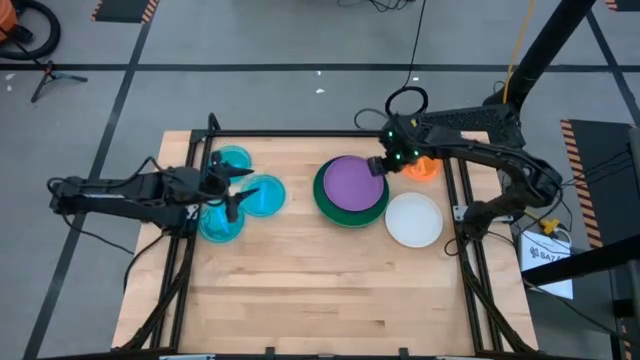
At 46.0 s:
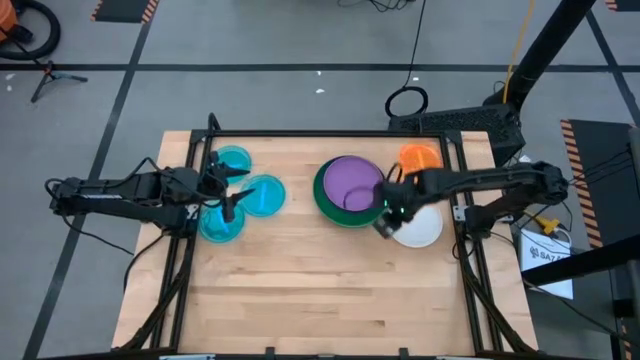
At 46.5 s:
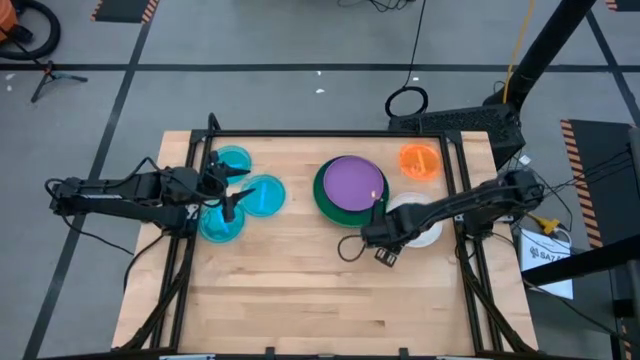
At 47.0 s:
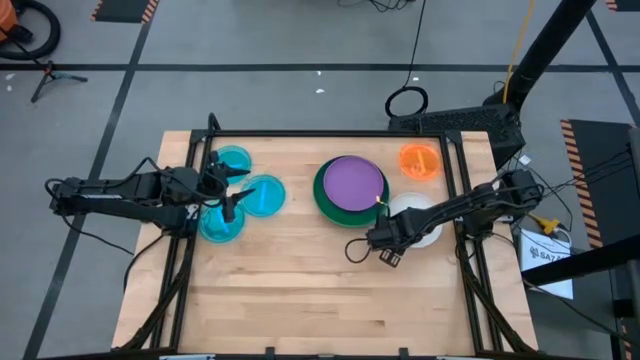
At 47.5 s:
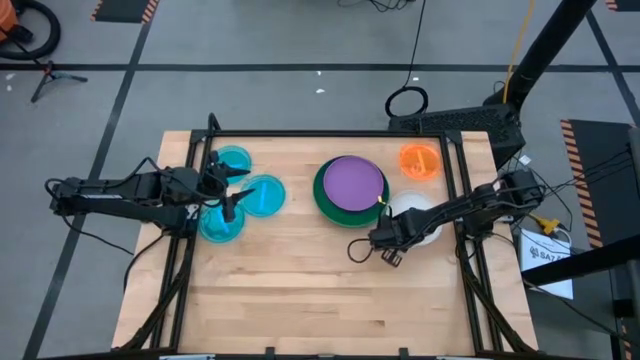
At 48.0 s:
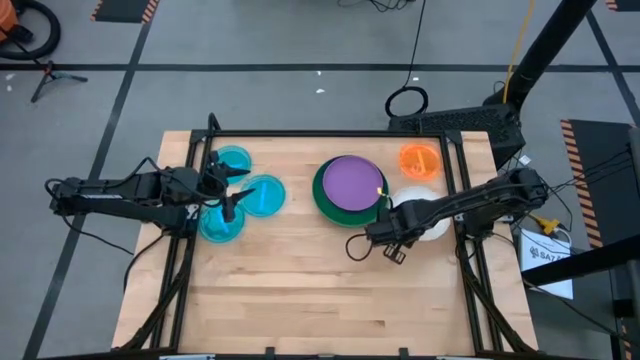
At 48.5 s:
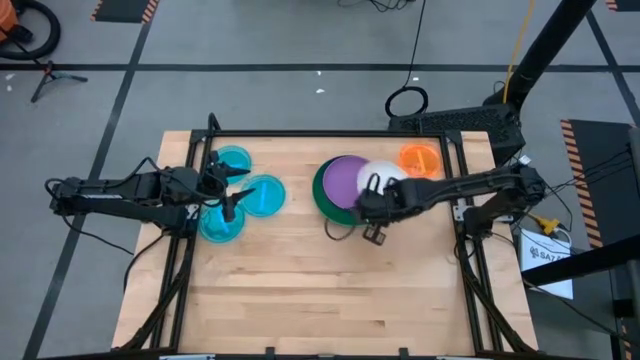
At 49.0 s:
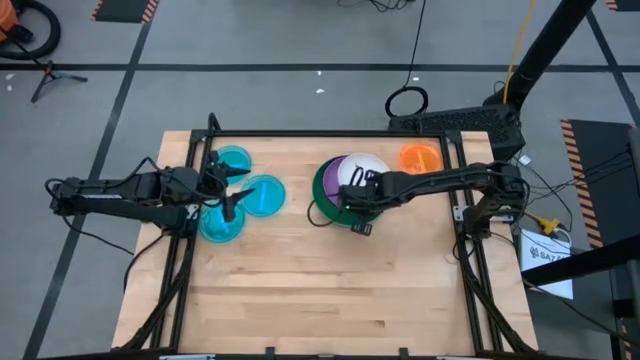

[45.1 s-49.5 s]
Task: Stack plastic plates
Stack the white plate on the purple plate

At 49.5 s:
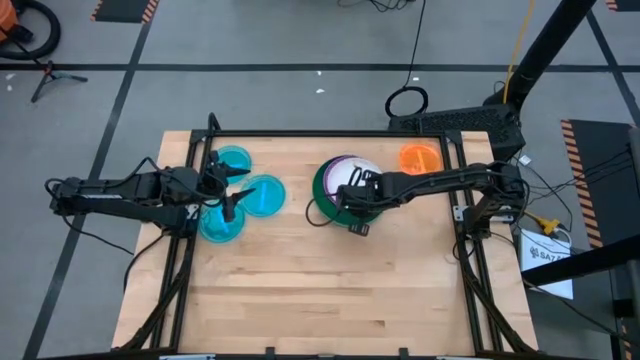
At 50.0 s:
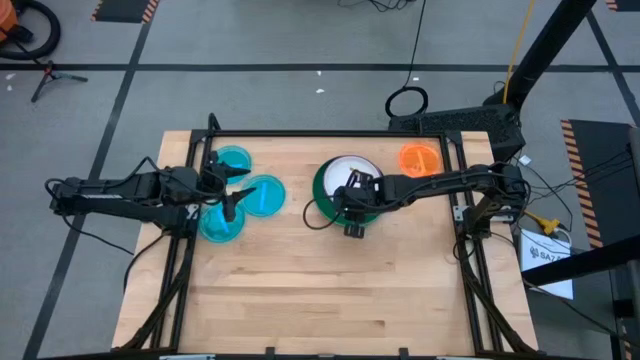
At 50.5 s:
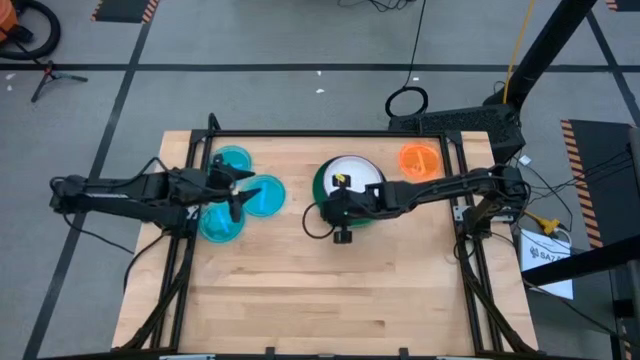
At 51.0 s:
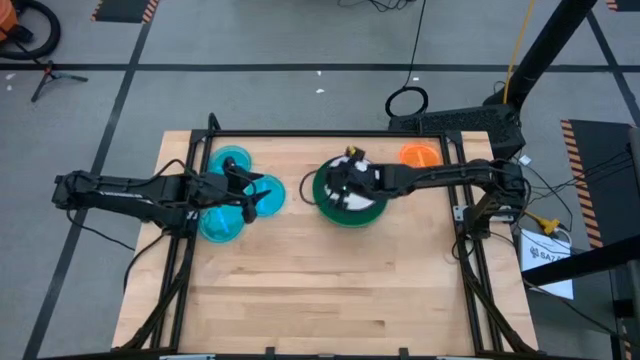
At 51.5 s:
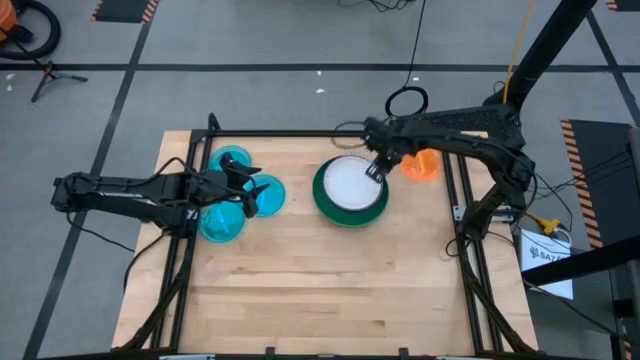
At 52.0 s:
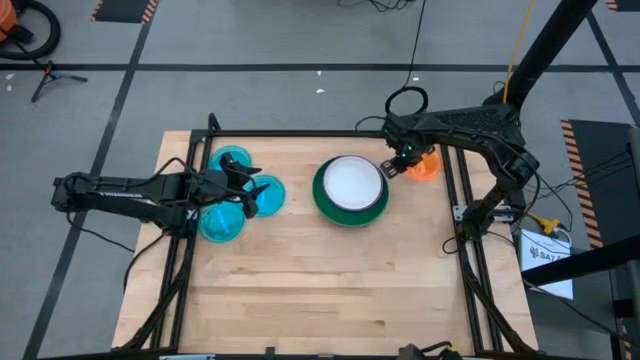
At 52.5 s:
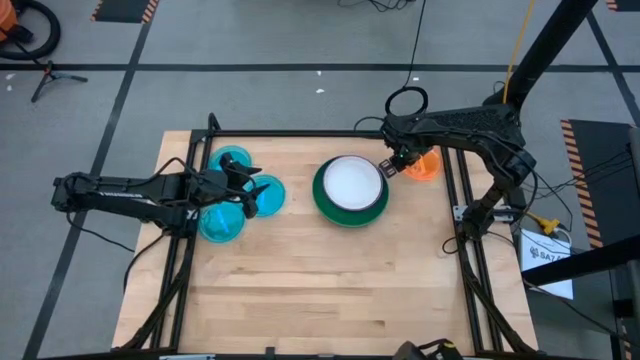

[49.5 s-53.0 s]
Stack the orange plate on the white plate

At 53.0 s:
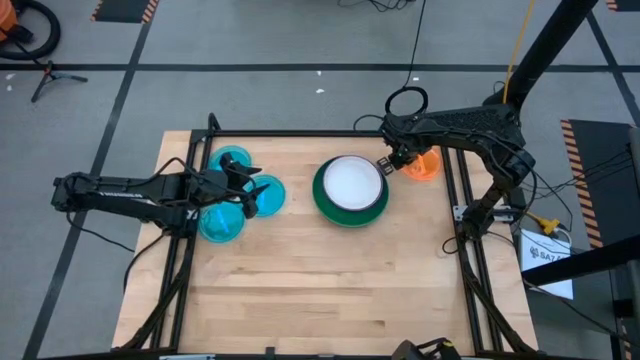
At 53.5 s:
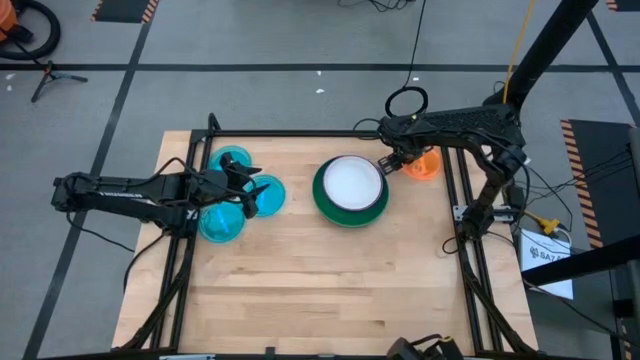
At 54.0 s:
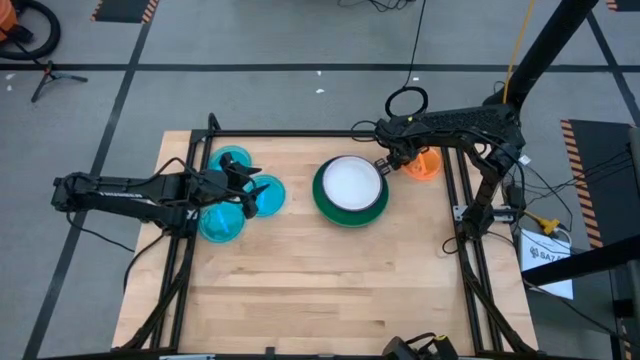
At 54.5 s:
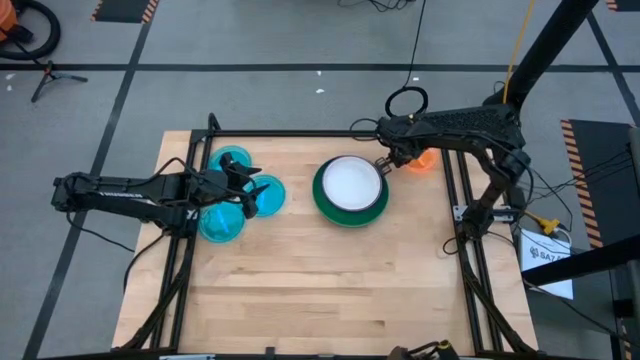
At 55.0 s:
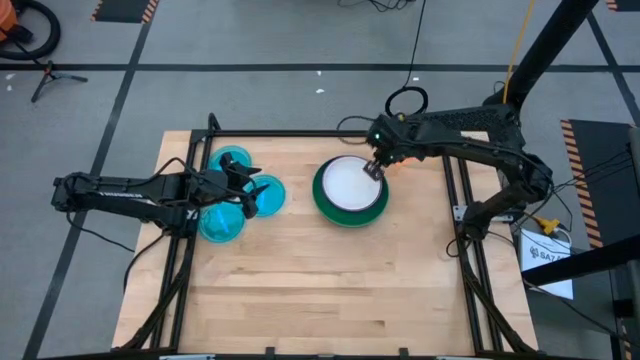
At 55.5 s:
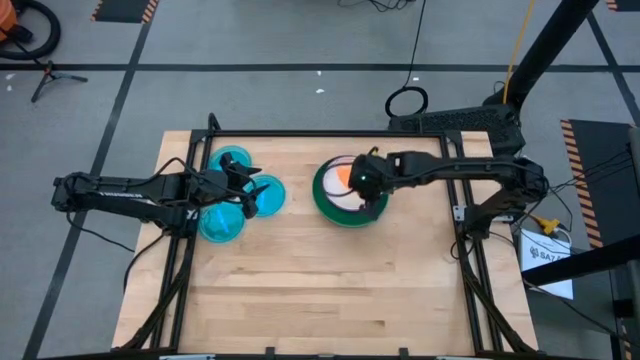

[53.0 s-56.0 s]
Stack the orange plate on the white plate

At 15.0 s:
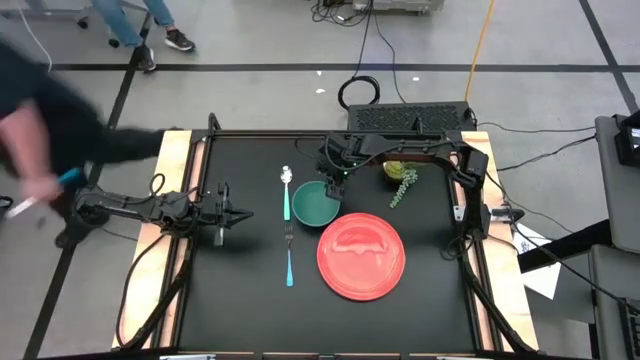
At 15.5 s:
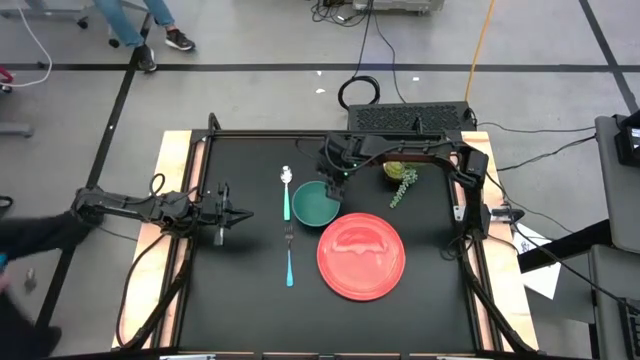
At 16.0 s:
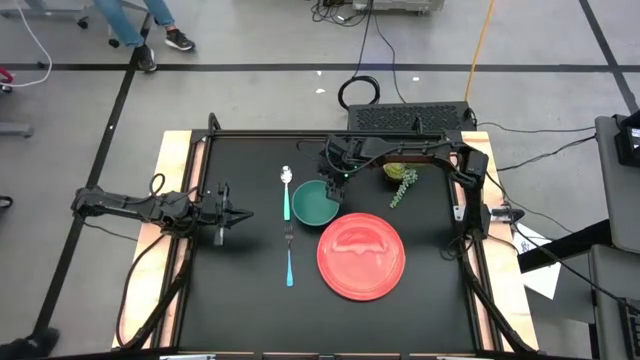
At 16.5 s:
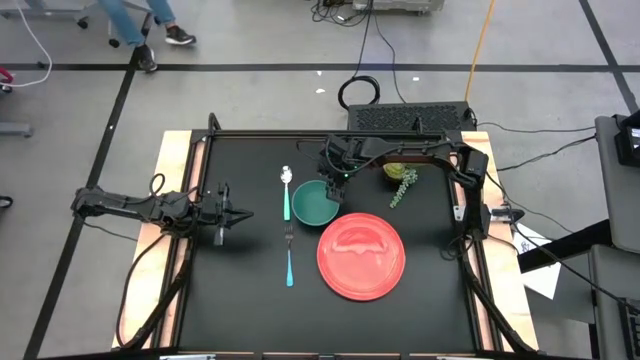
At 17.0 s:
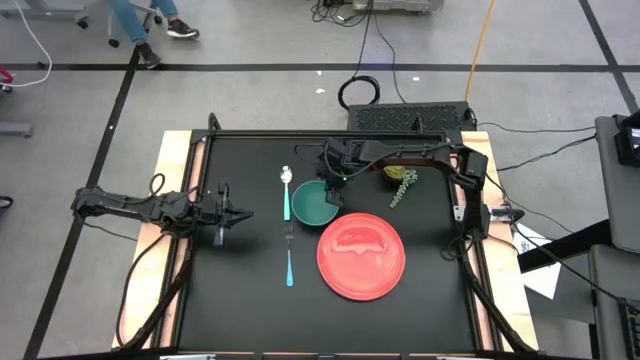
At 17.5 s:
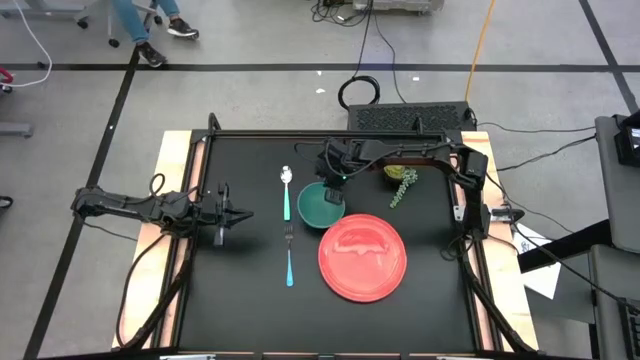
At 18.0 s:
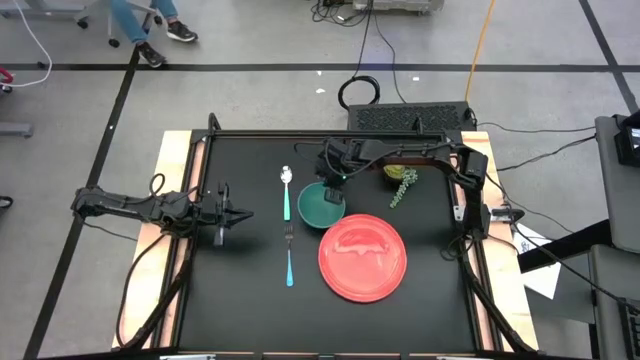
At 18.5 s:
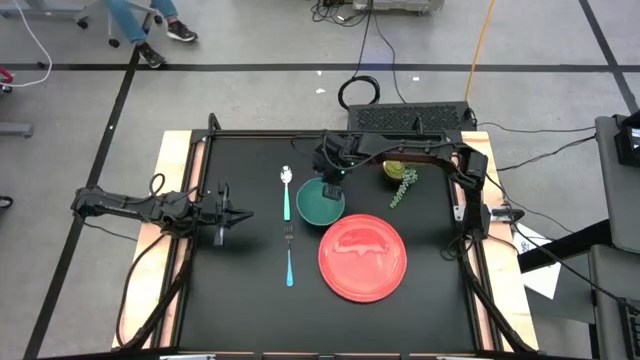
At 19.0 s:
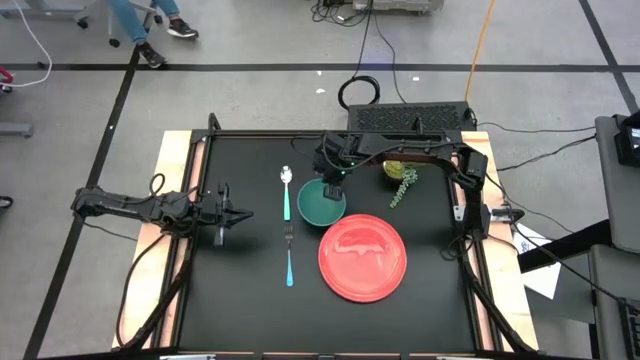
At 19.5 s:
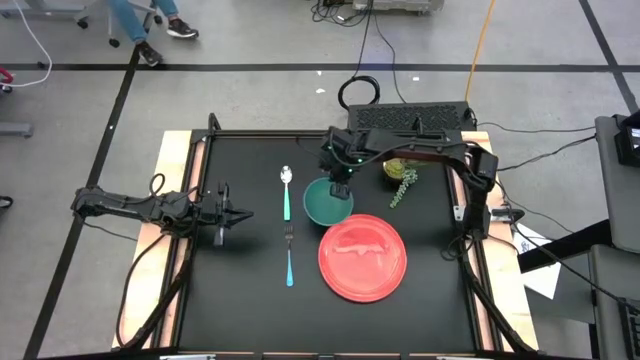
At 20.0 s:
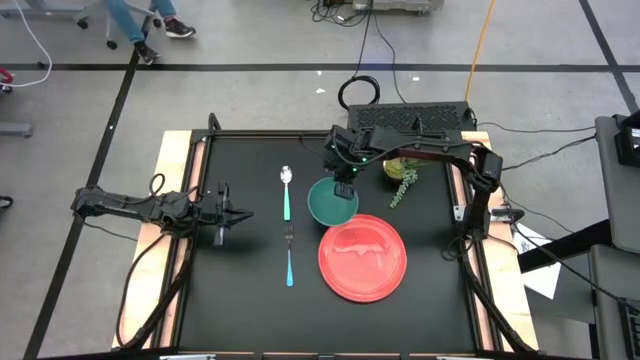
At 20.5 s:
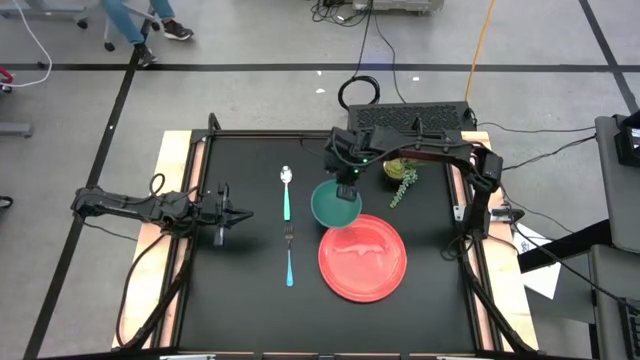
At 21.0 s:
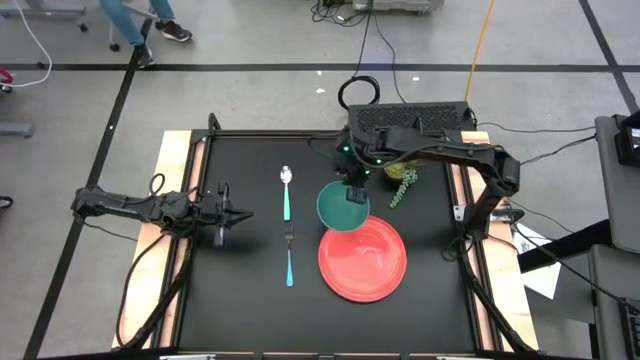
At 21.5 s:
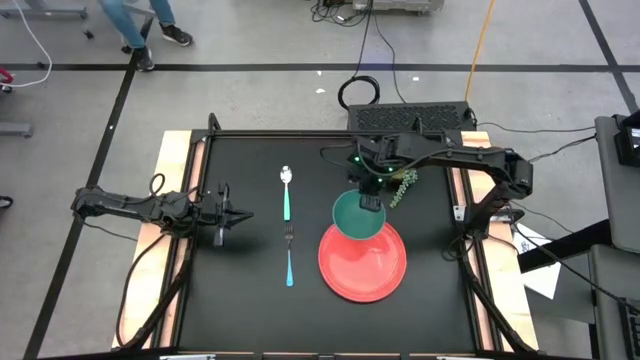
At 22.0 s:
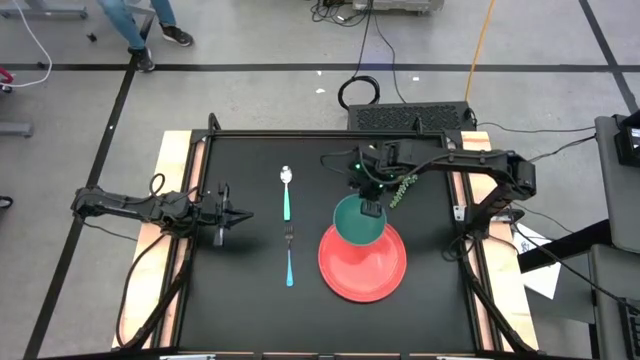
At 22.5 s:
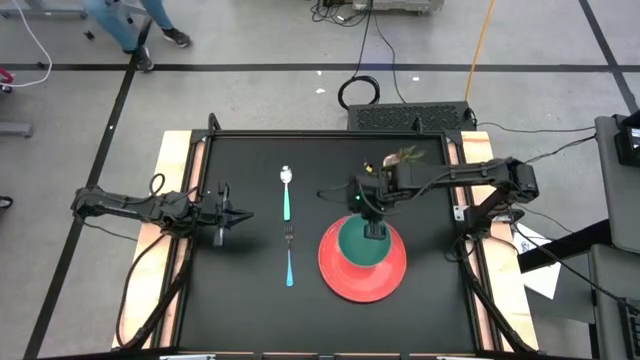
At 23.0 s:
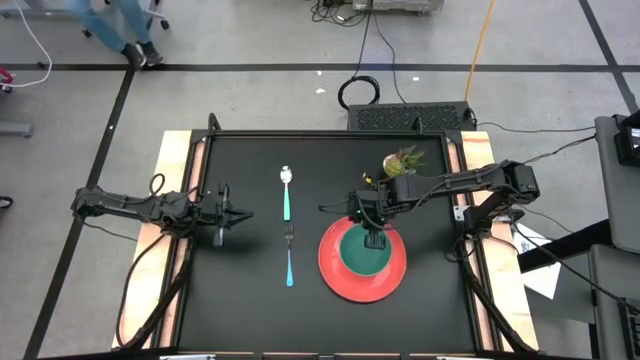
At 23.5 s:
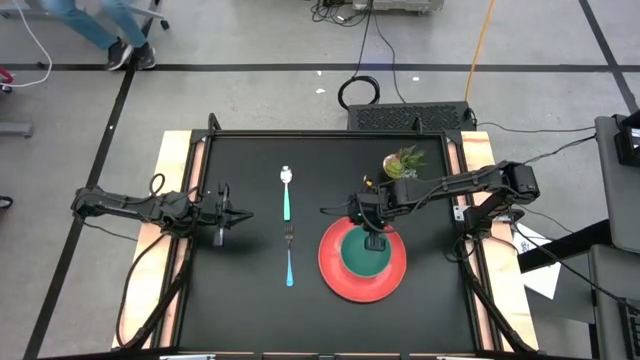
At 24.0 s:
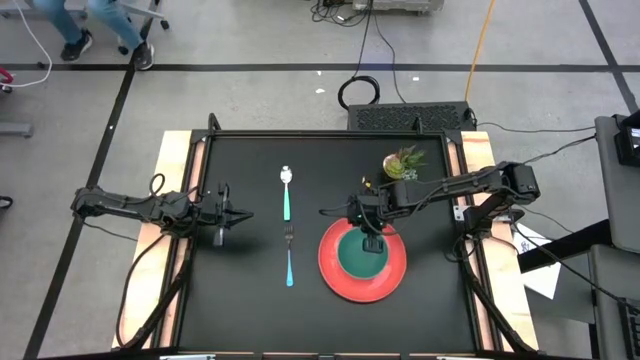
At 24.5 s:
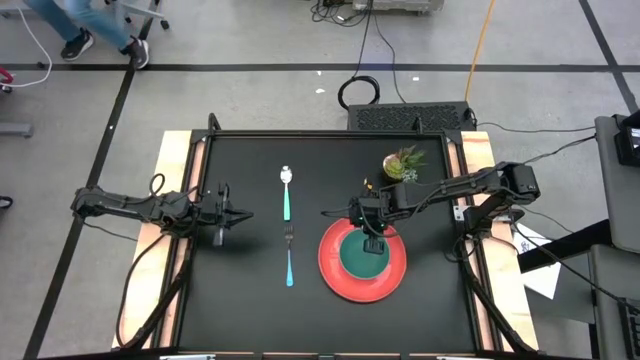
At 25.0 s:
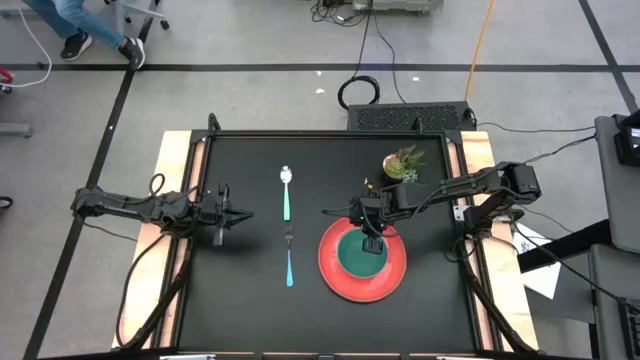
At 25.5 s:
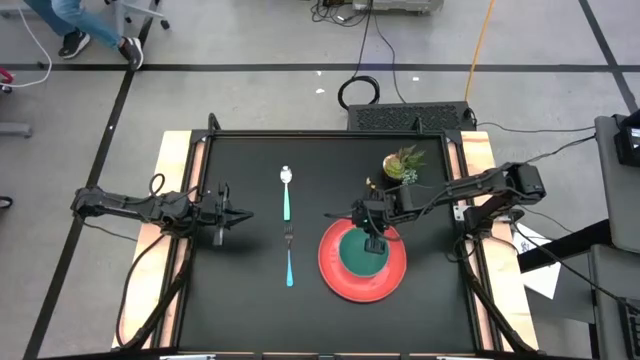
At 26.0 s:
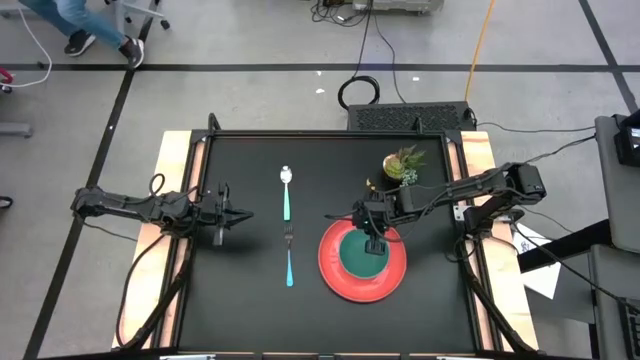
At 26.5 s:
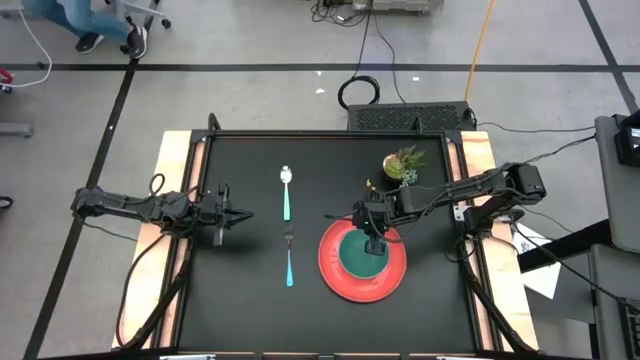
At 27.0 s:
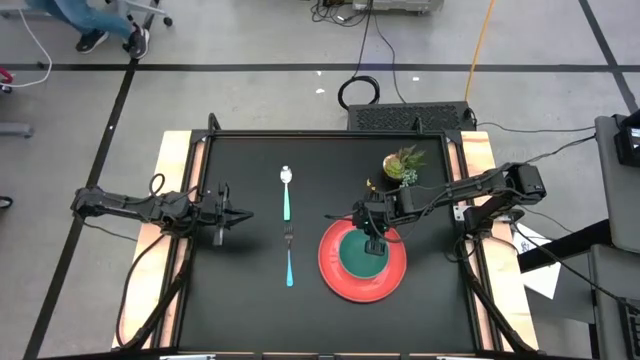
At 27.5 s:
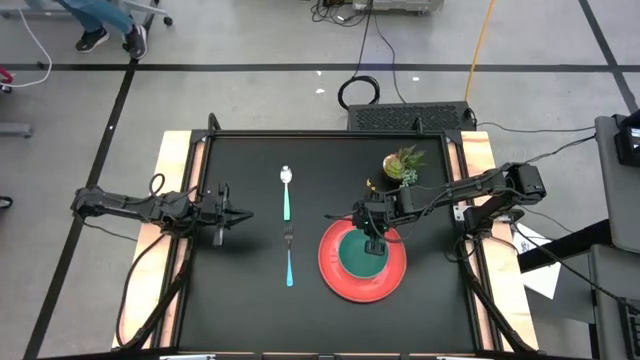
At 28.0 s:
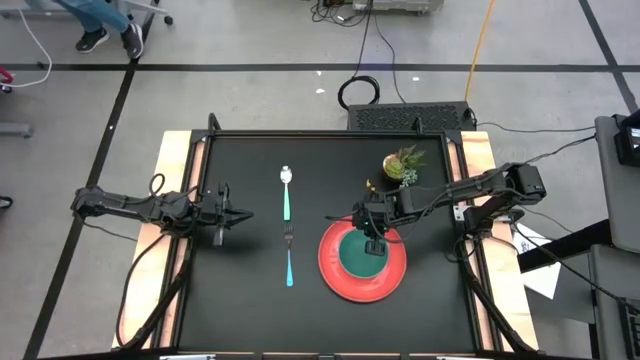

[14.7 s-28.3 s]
Task: Set table place
Put the green bowl on the orange plate
